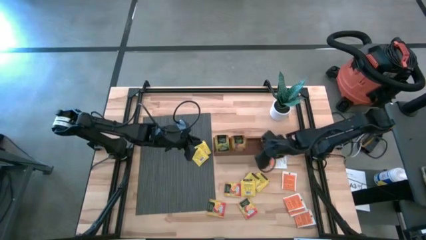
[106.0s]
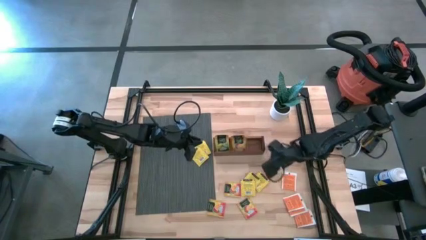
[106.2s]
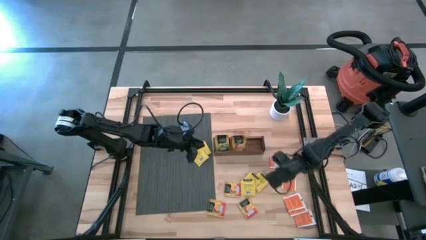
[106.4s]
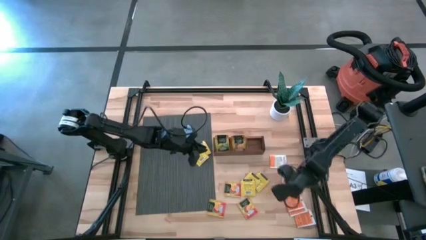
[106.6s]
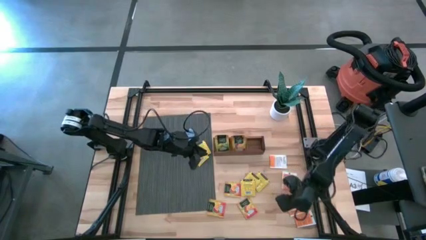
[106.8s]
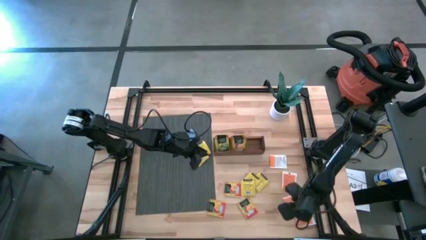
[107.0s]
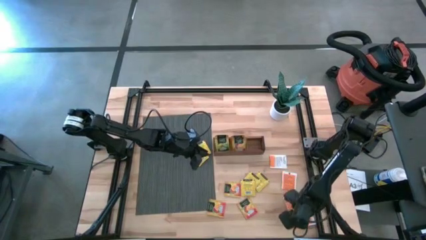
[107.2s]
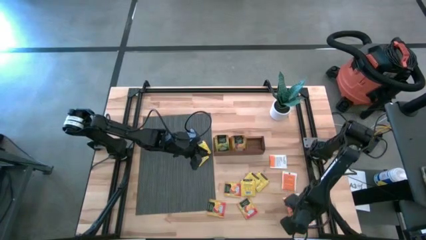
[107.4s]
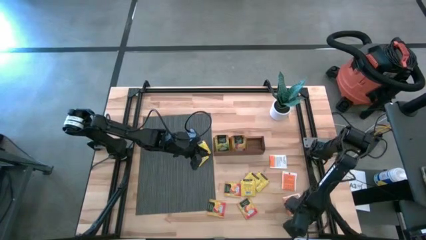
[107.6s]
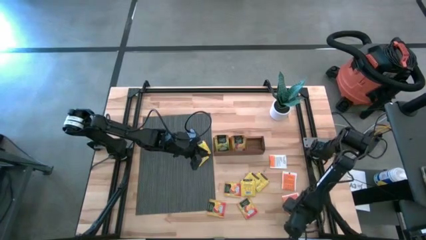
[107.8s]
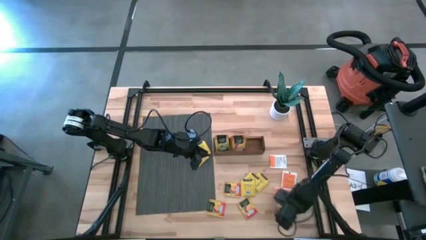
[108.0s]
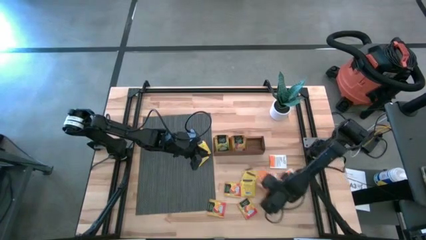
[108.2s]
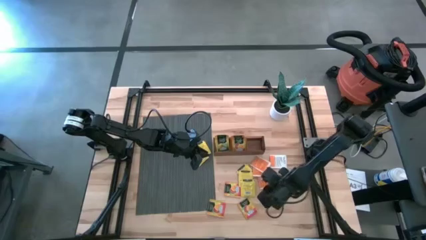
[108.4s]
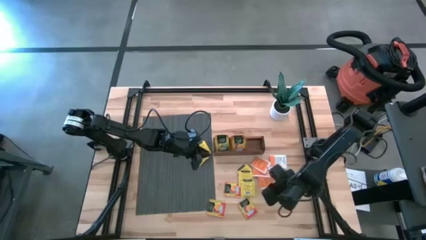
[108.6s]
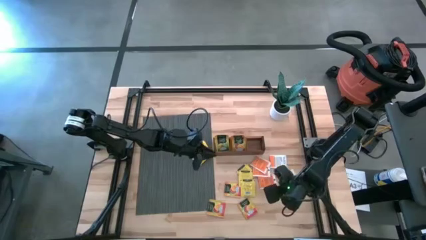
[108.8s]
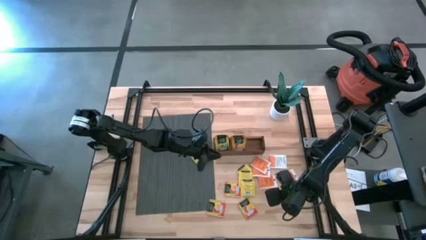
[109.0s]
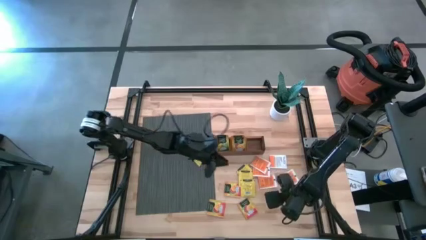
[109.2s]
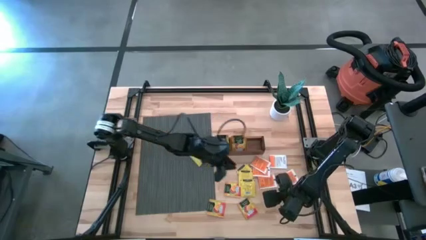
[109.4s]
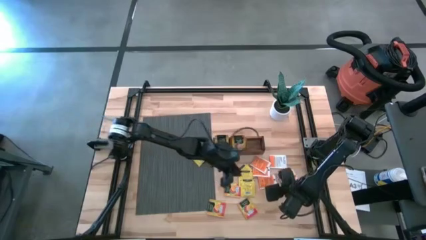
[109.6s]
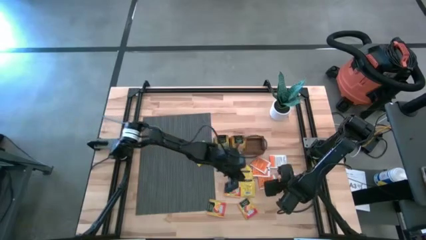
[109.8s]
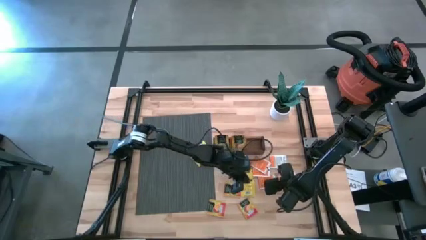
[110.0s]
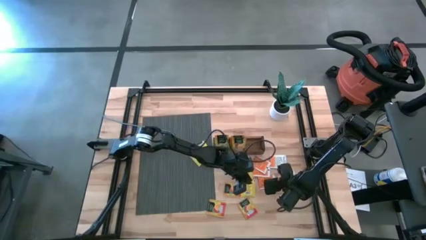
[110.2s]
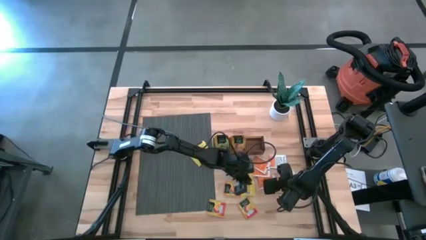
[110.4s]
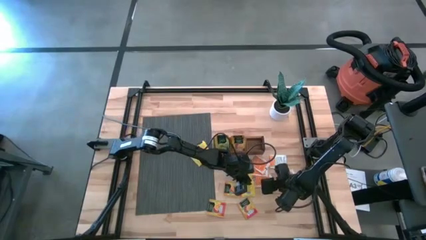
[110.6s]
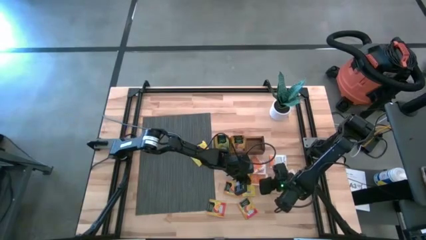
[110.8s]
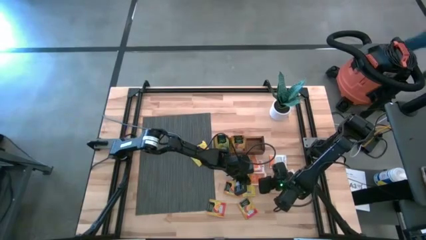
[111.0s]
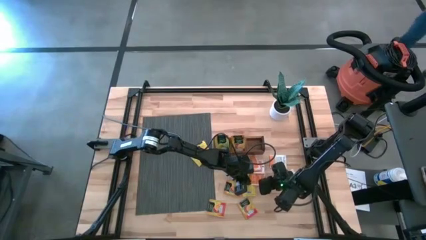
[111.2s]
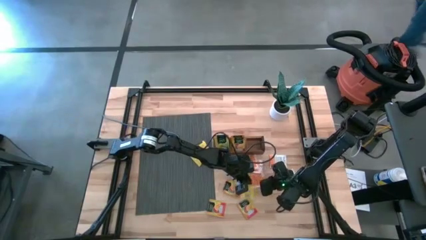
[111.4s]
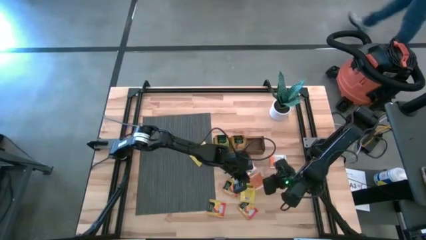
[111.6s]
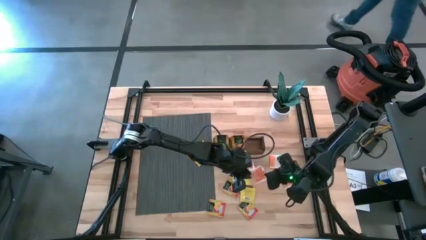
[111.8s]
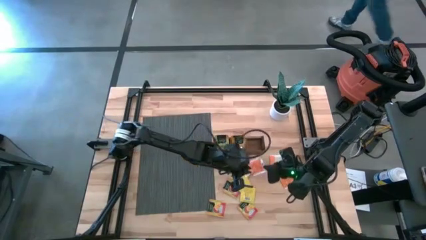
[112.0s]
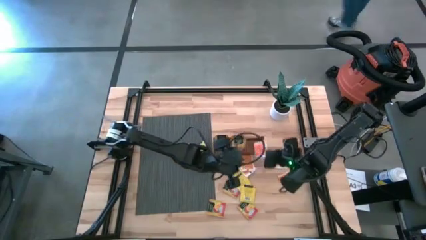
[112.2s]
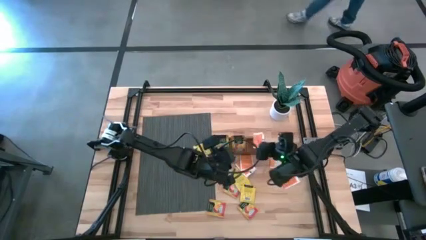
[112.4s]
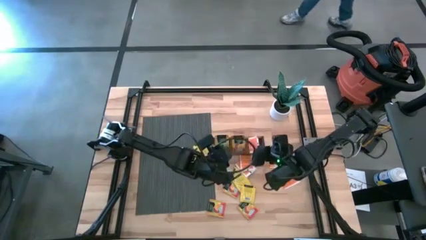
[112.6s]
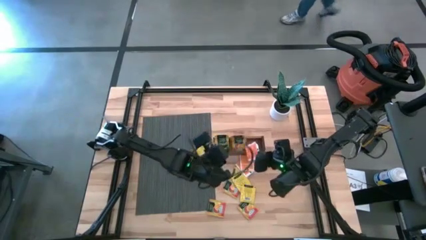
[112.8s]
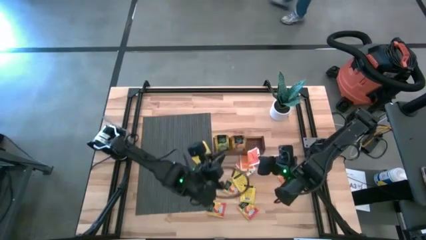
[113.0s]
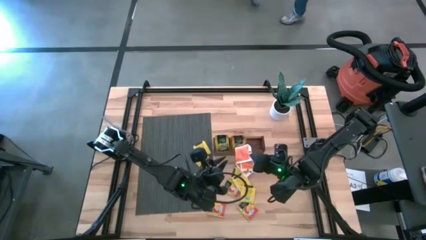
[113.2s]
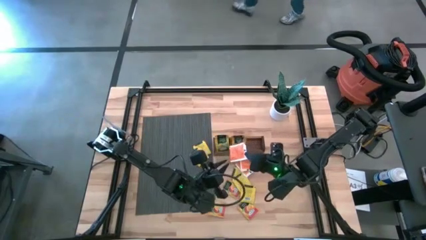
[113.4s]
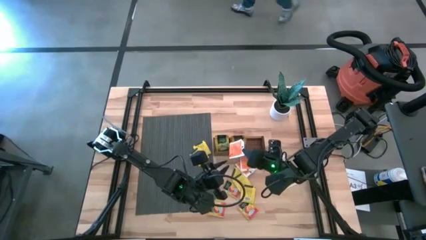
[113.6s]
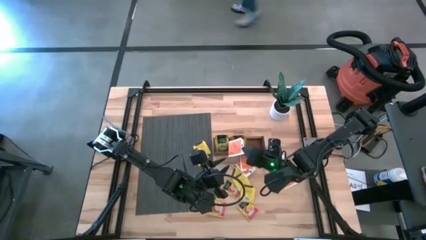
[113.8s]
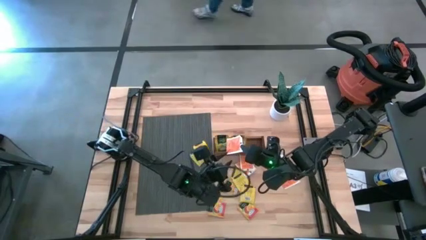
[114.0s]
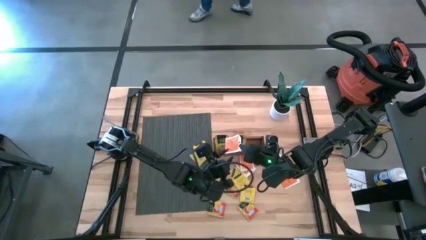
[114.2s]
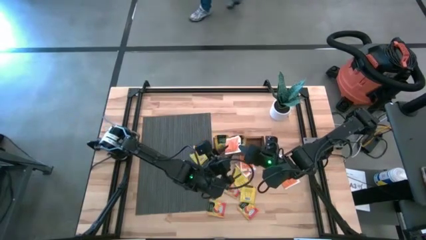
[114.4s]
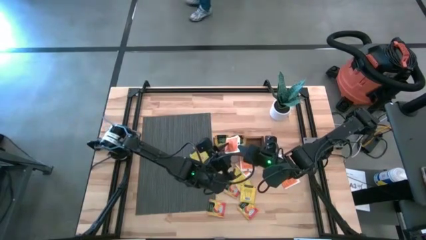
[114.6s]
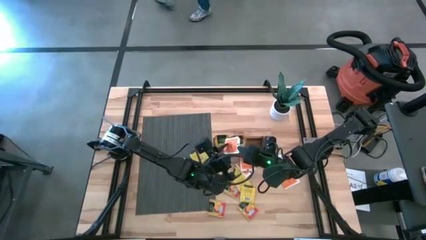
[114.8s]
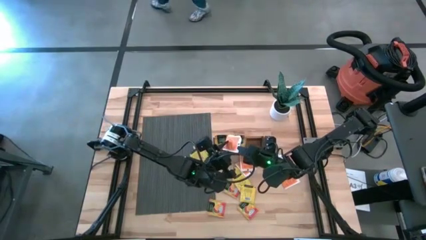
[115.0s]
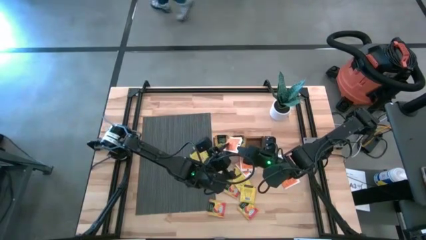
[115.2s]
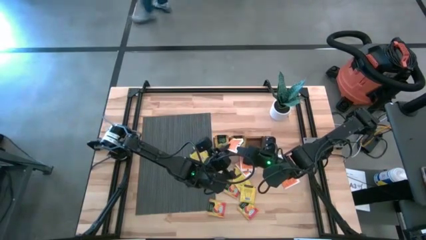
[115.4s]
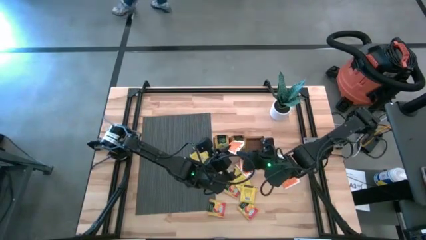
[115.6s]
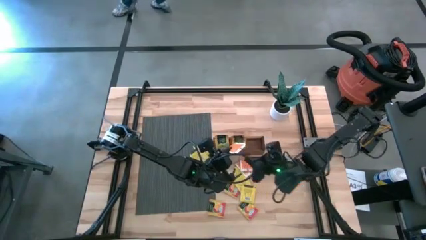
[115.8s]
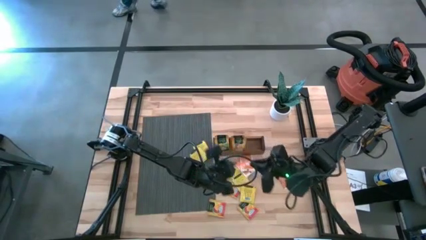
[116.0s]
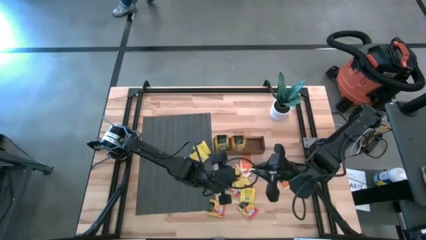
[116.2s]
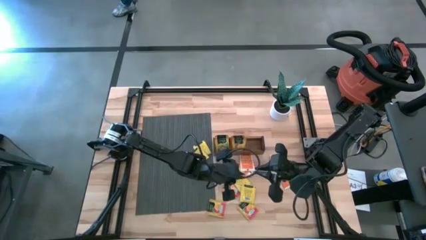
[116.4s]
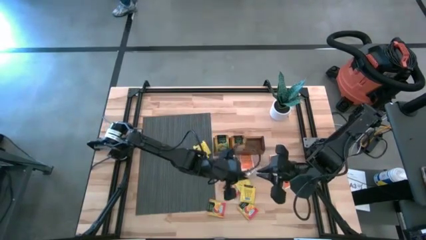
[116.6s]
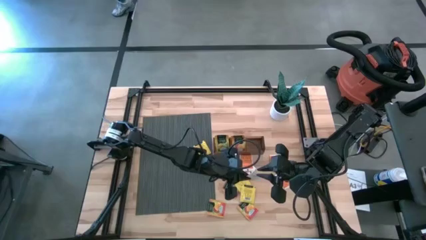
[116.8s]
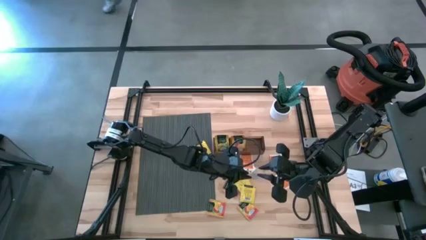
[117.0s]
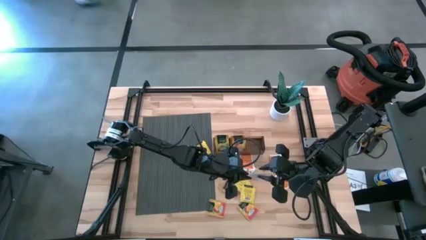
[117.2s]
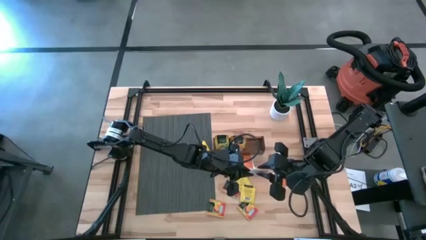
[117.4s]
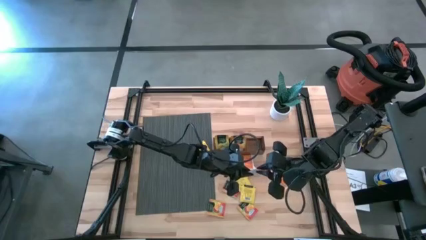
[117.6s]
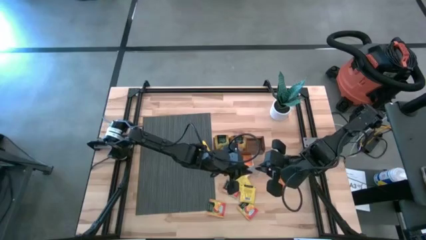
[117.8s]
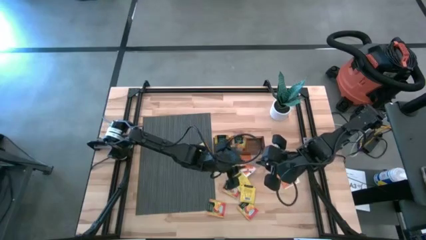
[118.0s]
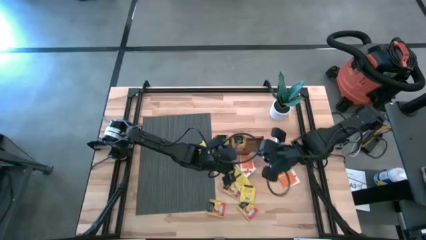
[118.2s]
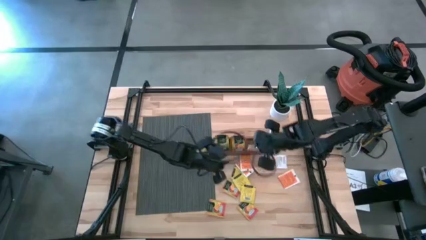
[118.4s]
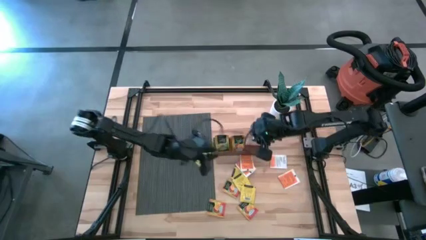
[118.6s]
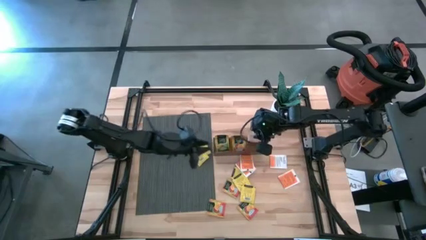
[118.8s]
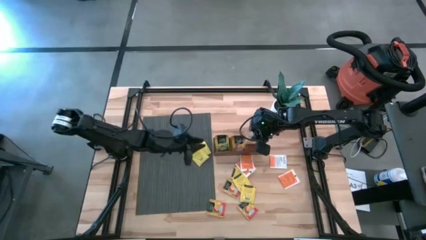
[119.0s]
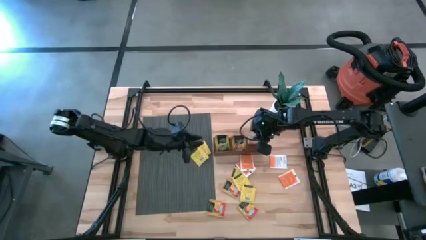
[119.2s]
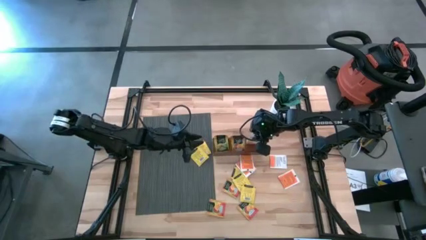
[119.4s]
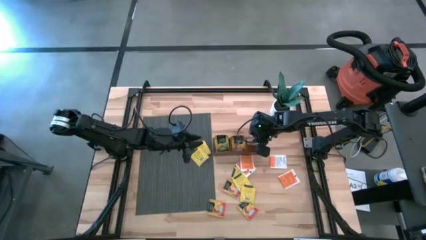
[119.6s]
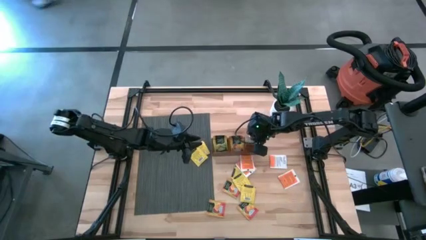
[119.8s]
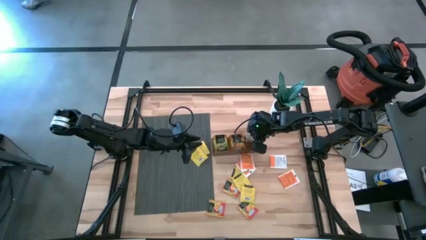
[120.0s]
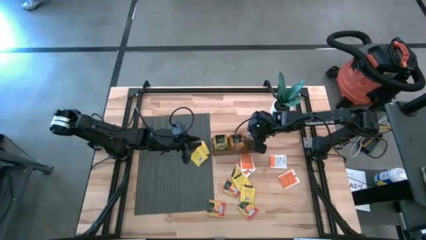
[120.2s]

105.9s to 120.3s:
Task: Pick & Place Tea
Put the white tea bag into the right section of the wooden organizer

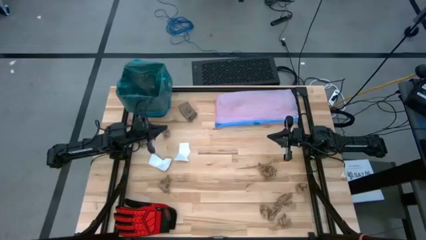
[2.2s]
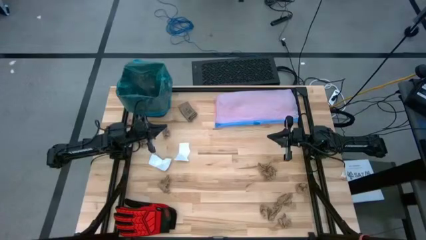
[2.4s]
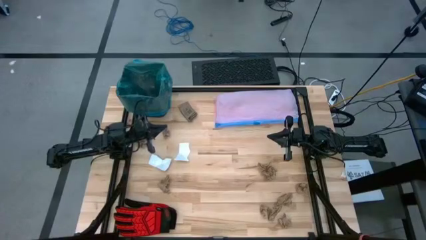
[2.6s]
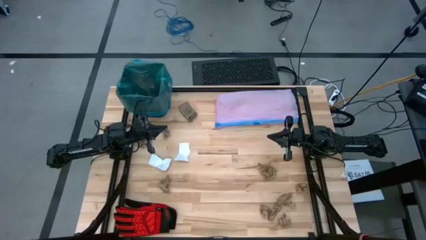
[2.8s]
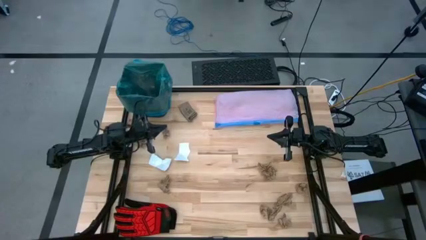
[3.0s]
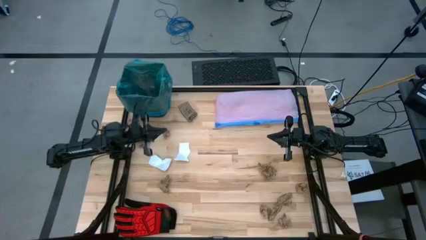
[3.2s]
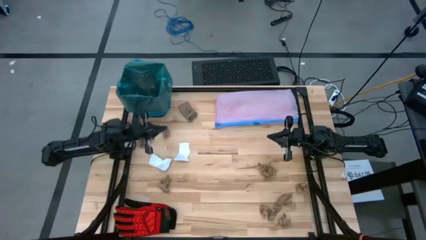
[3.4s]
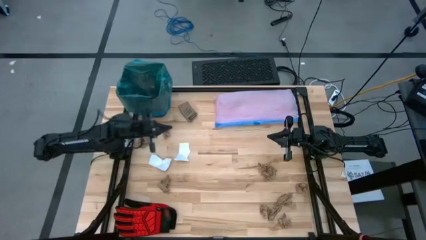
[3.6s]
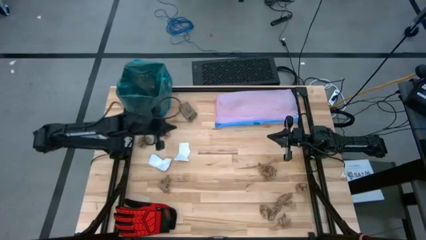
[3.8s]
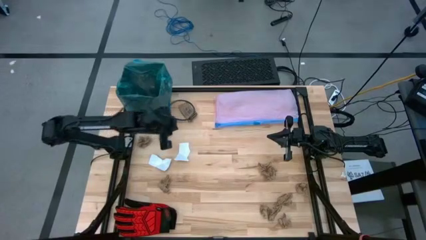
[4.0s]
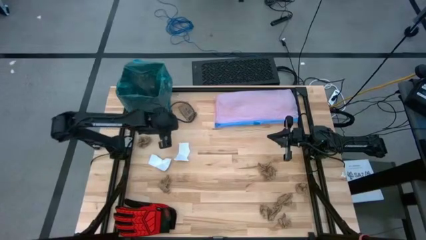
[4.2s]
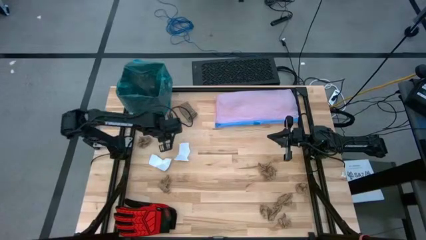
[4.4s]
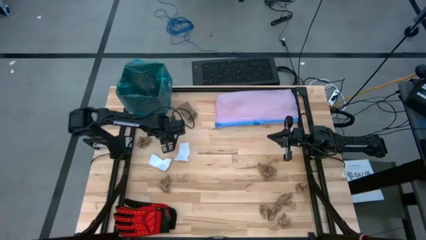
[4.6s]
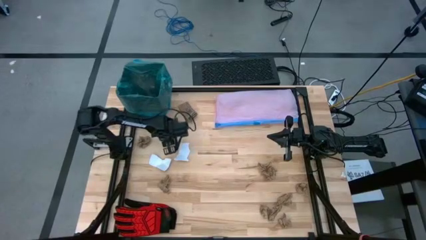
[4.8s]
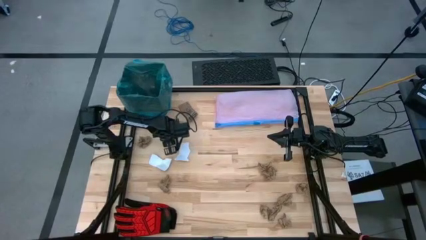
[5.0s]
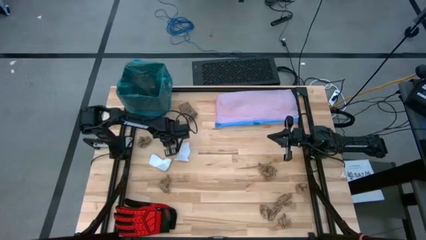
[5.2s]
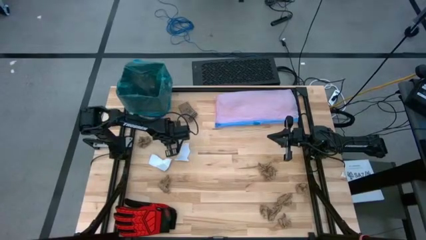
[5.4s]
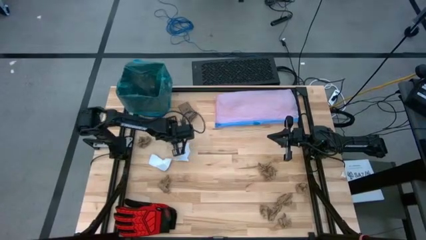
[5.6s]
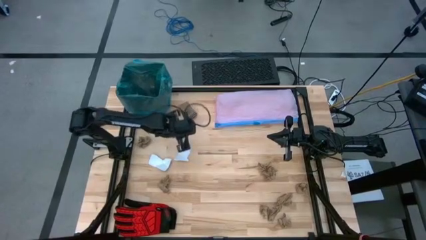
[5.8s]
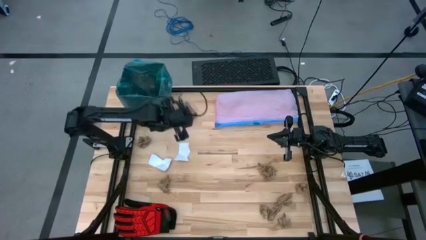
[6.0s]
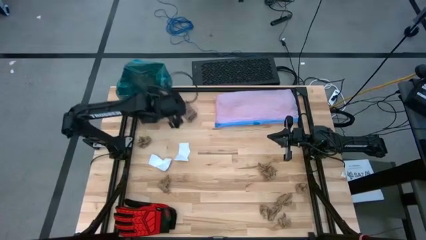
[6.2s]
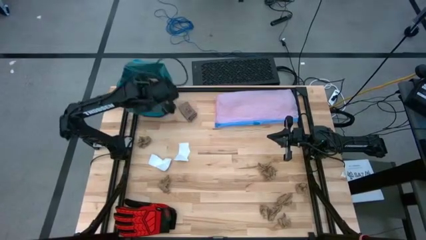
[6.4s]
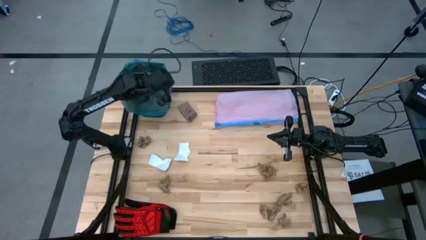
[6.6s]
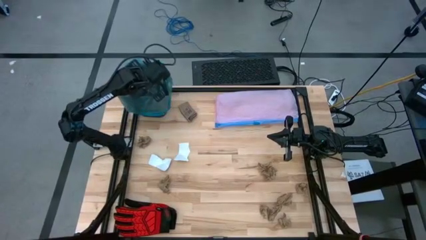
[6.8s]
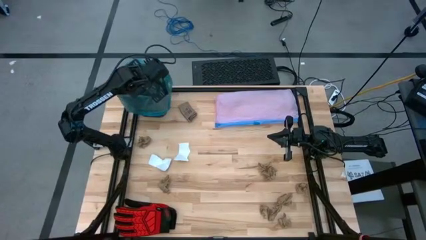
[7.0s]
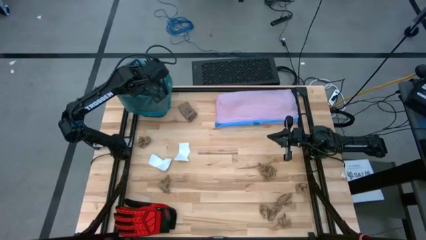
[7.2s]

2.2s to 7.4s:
Task: place trash/remove bag and relplace
Put the brown napkin into the trash bin
